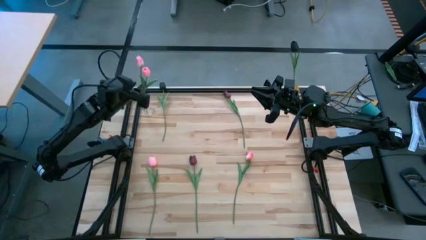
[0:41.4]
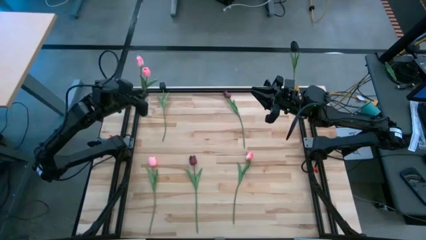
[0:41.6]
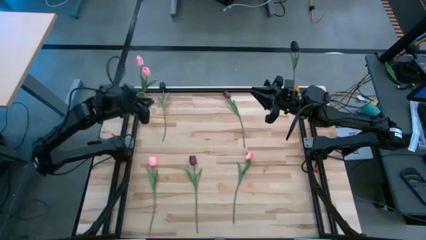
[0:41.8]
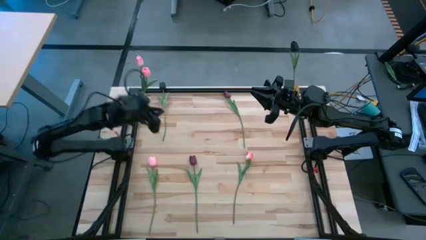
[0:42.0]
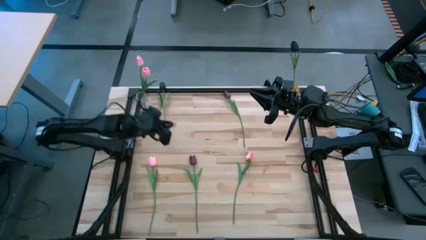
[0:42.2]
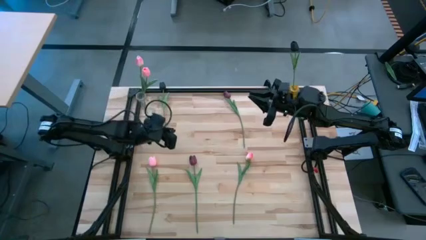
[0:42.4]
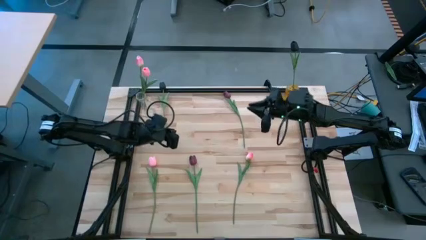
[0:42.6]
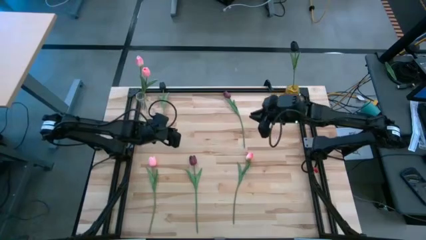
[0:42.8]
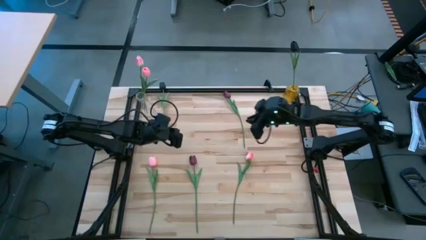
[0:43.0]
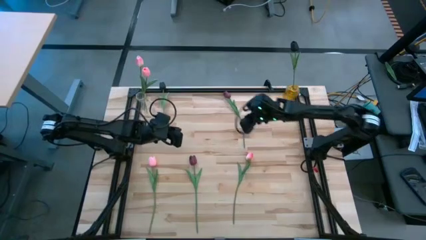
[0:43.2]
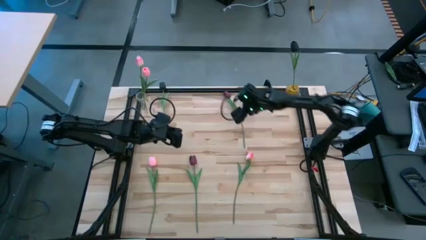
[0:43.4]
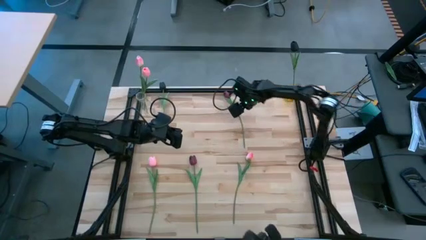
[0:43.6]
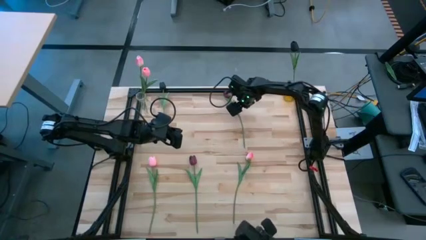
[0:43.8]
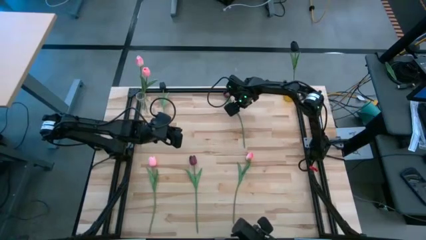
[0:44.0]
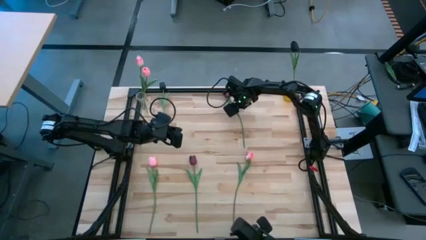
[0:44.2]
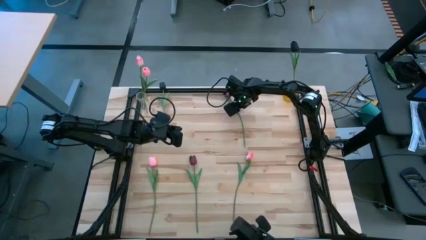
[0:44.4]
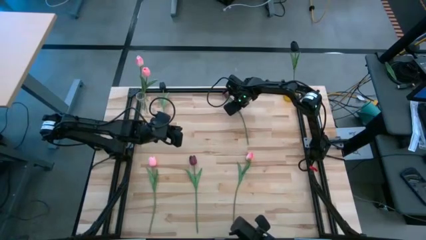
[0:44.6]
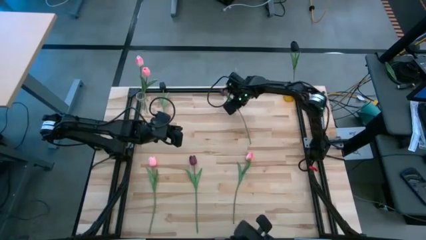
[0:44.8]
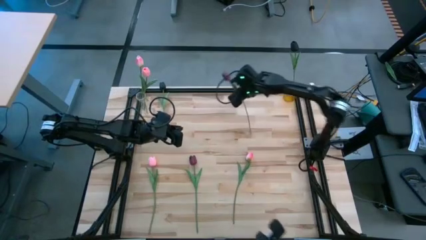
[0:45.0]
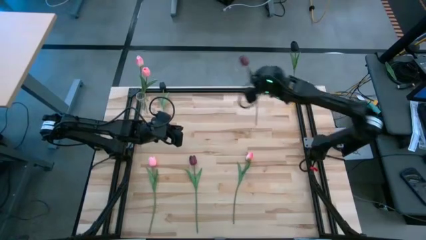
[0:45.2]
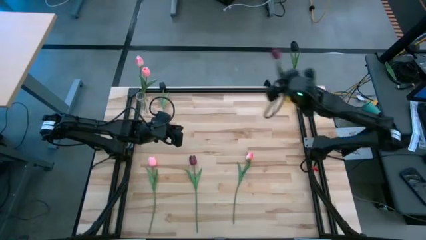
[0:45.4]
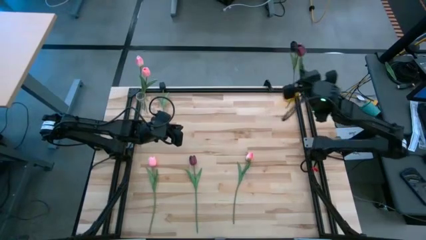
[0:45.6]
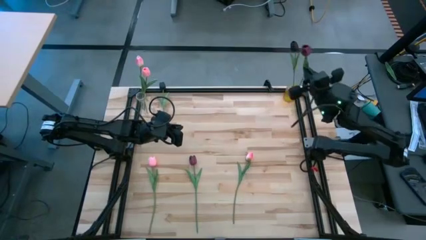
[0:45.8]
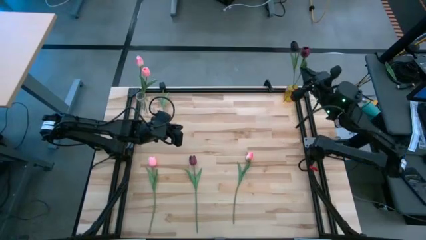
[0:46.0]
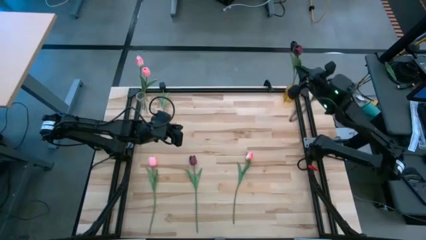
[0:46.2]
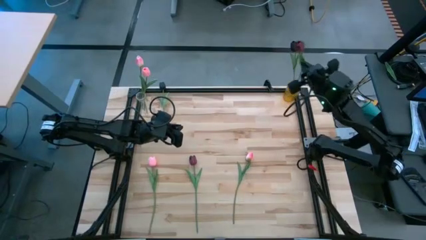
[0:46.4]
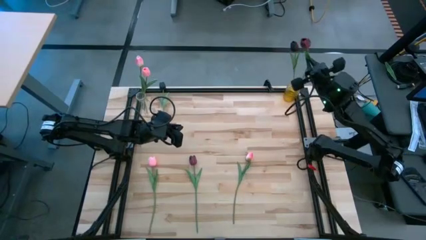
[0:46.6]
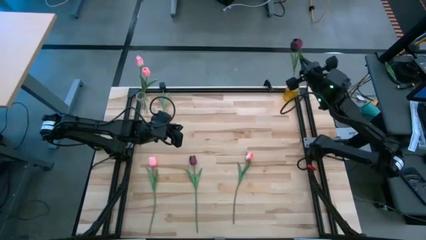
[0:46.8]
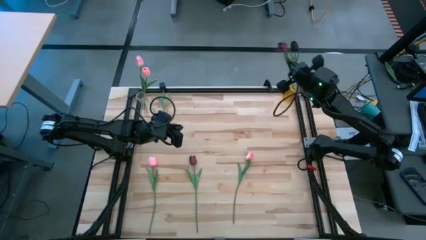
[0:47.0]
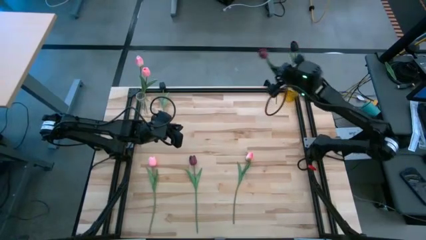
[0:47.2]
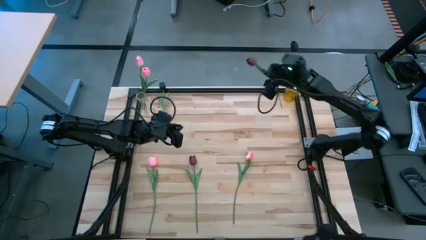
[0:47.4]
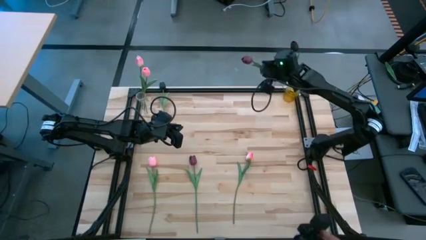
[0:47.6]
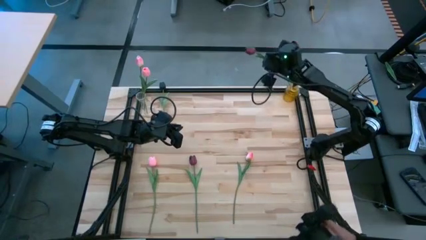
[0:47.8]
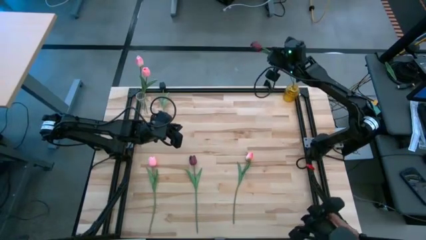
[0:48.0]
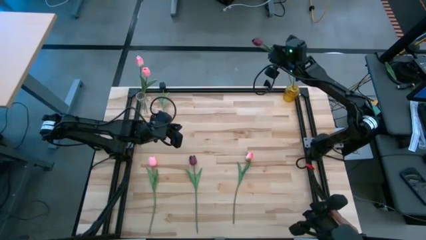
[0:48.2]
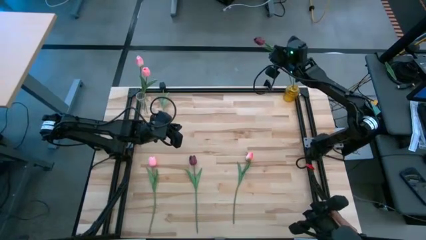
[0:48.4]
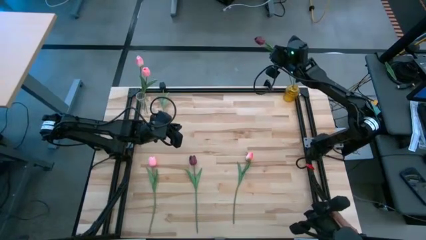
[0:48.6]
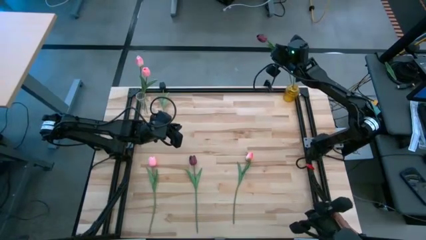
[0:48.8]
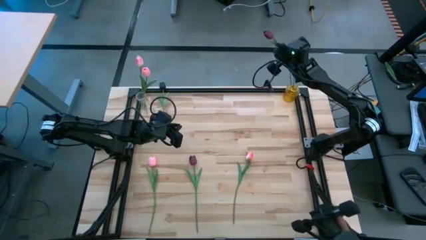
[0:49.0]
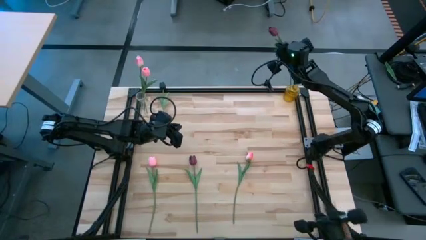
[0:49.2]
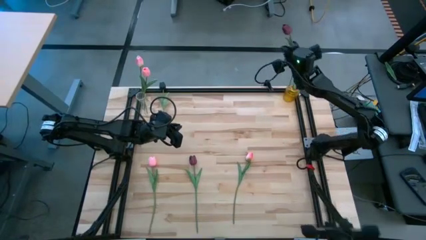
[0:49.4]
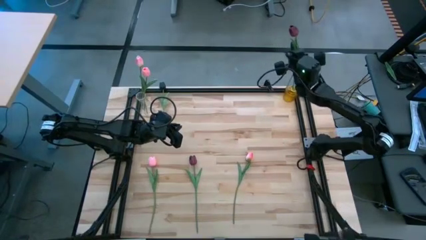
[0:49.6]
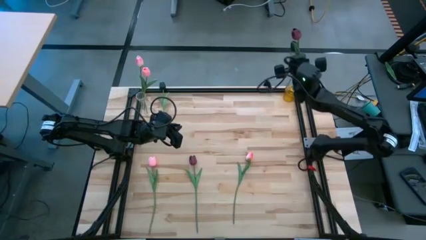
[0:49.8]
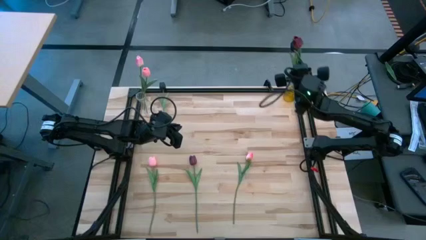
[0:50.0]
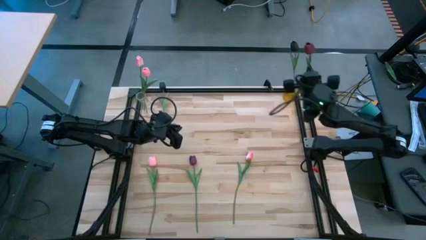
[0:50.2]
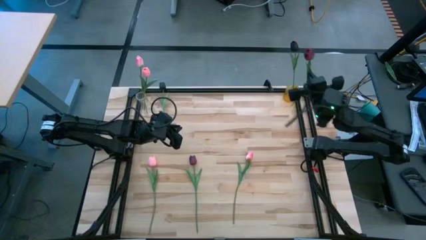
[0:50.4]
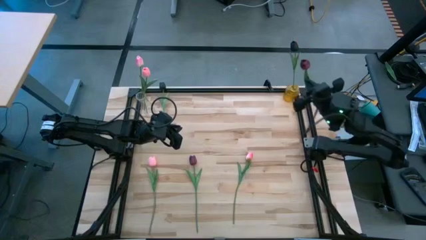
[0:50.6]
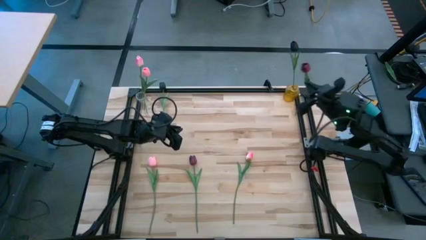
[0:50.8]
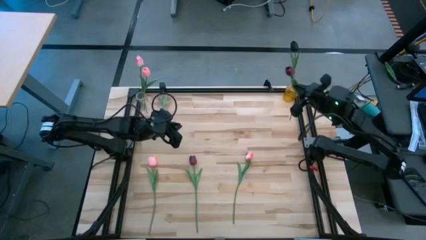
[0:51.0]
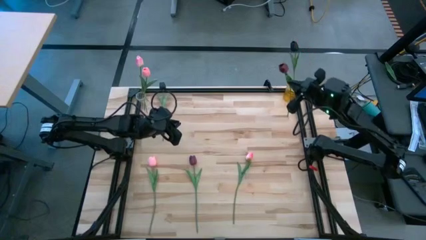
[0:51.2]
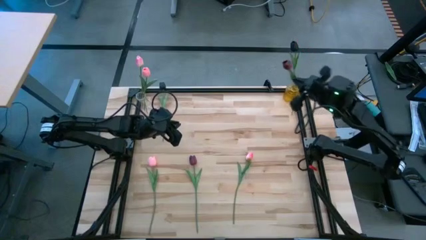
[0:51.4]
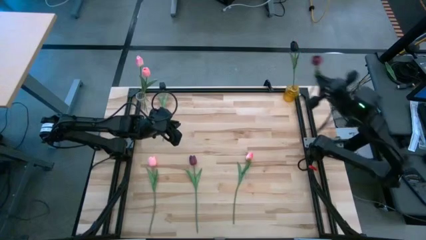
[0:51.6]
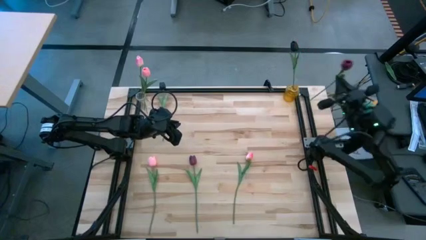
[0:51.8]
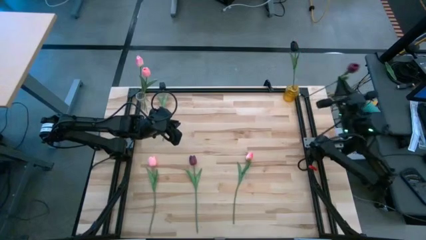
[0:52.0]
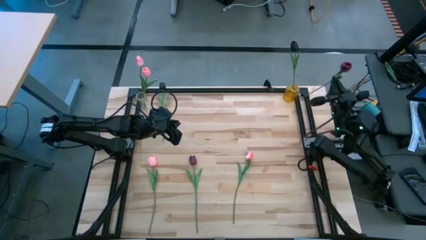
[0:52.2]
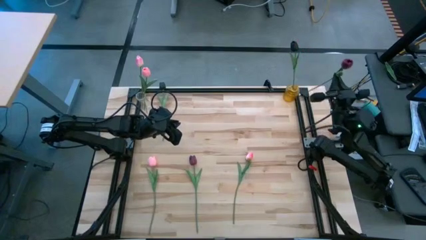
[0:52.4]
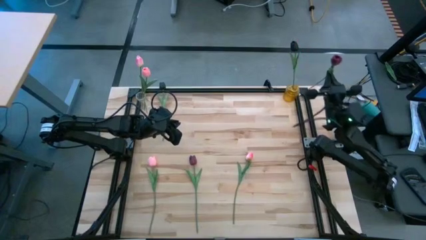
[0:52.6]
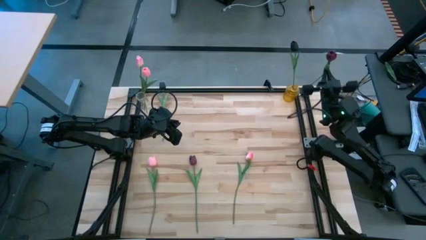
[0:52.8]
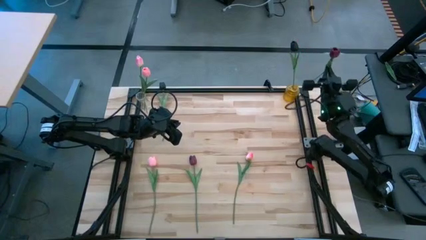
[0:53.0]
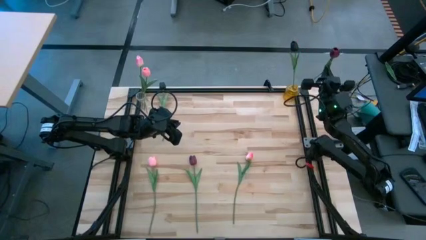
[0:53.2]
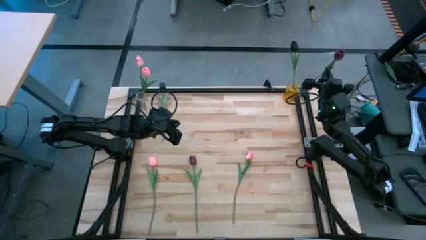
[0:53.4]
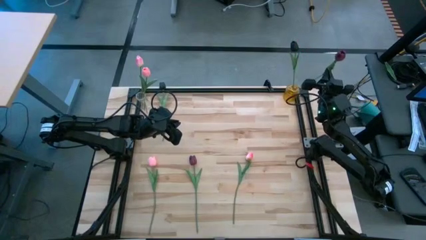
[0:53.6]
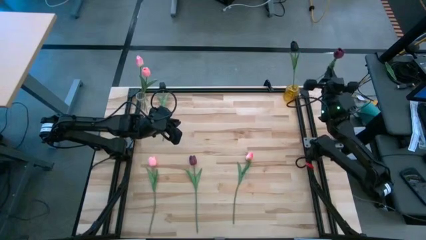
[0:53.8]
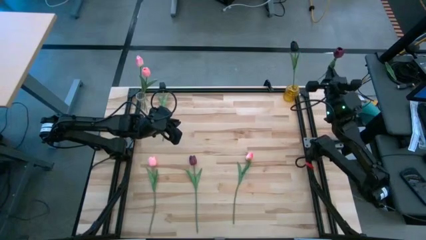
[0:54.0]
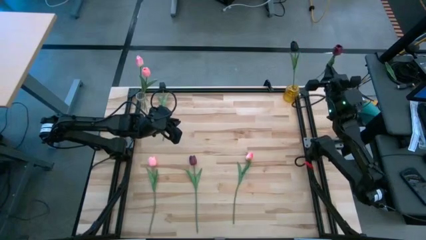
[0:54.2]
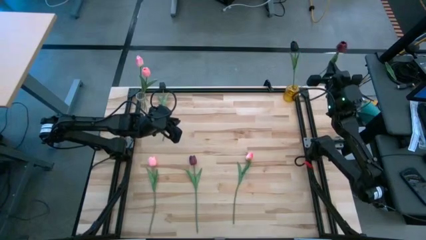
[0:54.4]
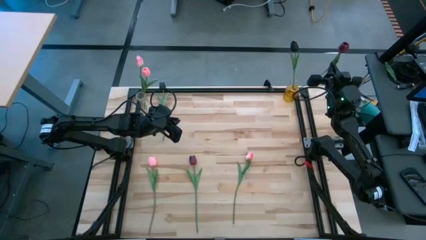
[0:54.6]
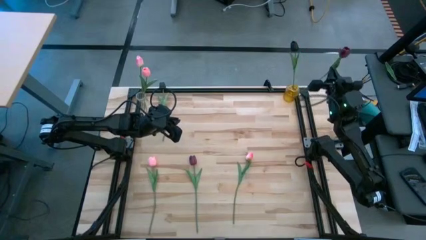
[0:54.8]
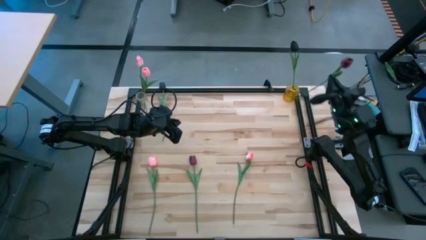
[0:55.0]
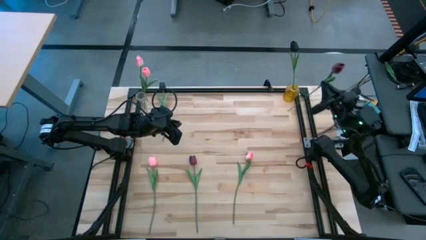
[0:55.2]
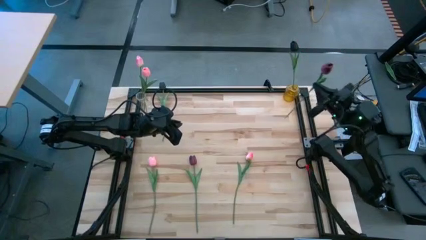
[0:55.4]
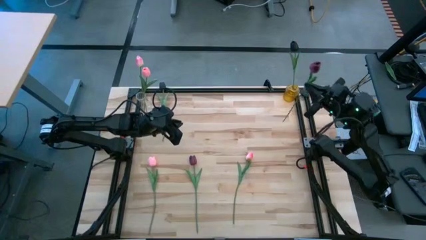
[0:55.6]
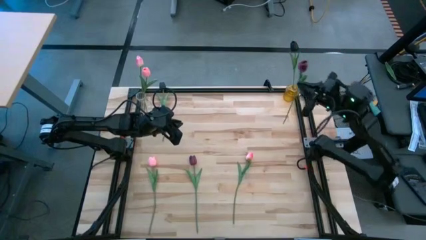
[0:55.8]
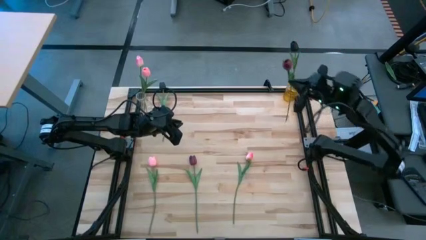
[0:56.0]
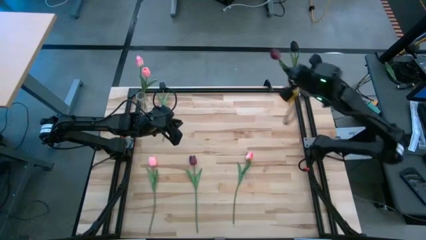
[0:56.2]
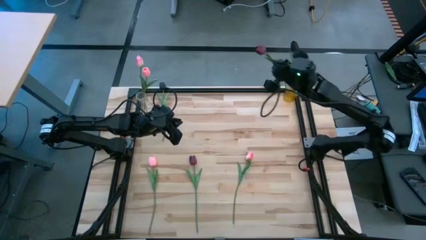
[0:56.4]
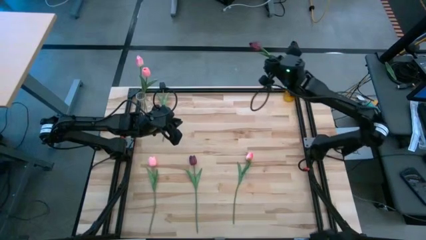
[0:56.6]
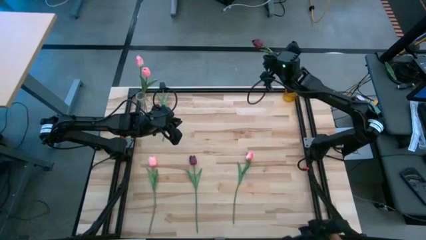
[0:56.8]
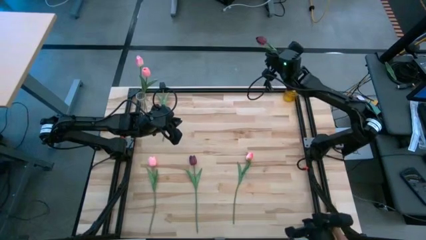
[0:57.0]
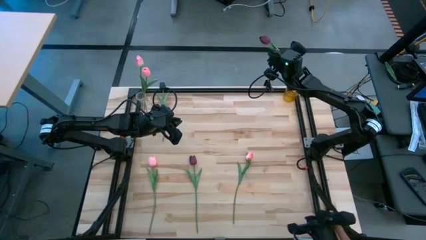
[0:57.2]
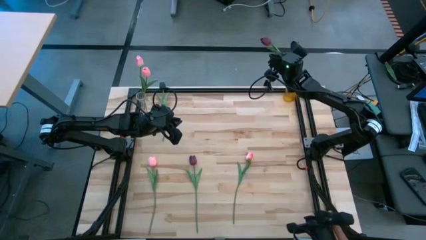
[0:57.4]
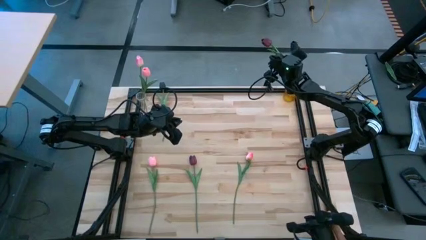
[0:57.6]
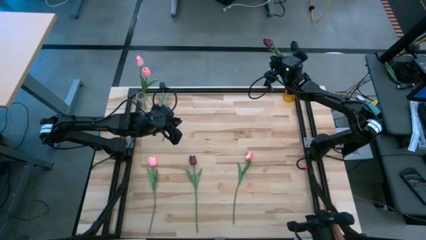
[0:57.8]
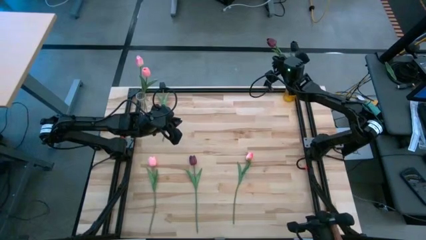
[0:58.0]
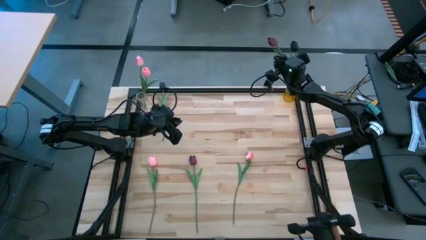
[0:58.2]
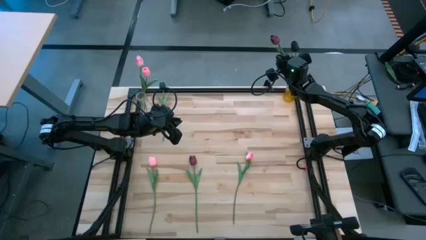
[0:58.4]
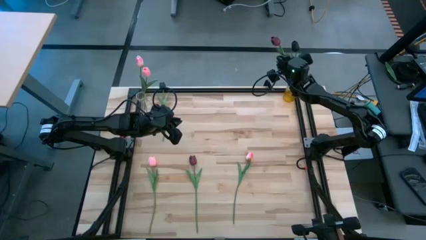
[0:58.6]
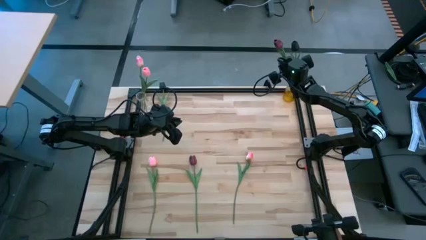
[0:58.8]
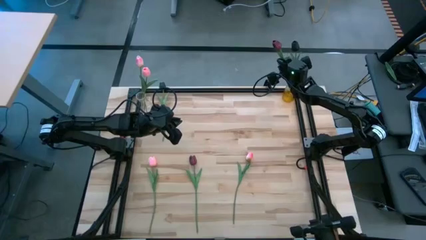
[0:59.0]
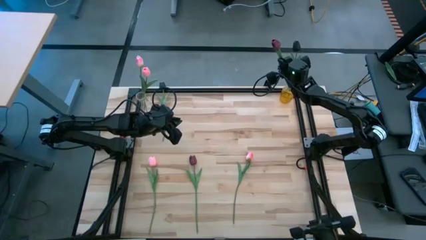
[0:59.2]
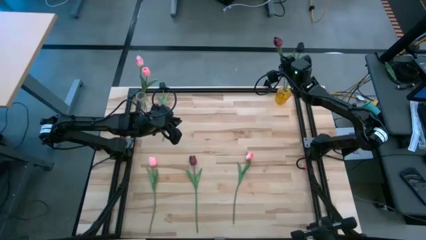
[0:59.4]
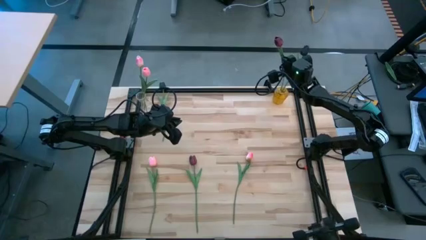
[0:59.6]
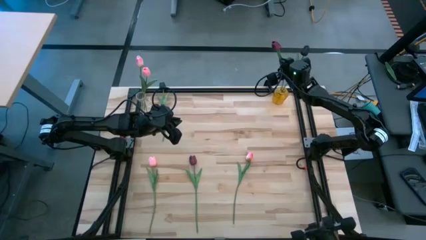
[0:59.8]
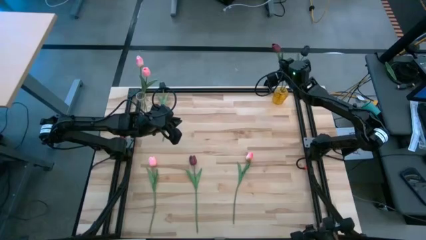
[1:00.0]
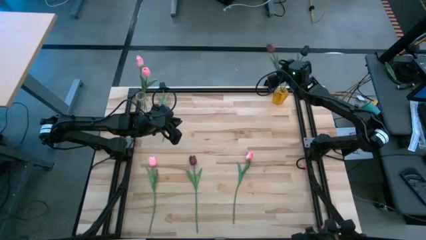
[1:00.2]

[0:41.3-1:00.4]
Task: Sort flowers into vase by color
Put the top red flower into the yellow vase
